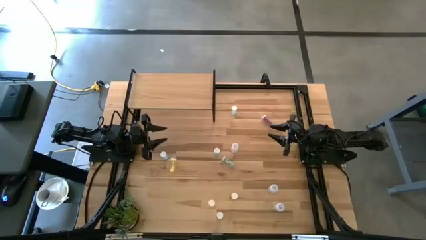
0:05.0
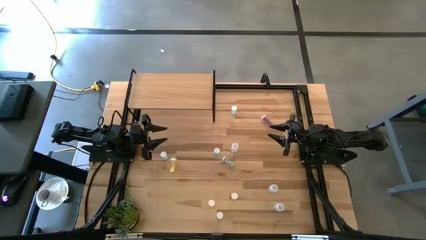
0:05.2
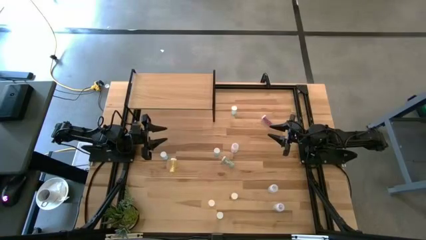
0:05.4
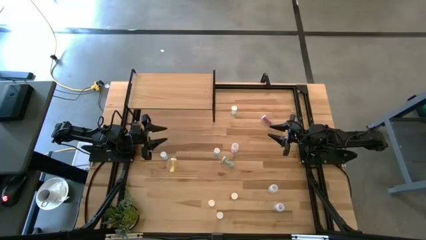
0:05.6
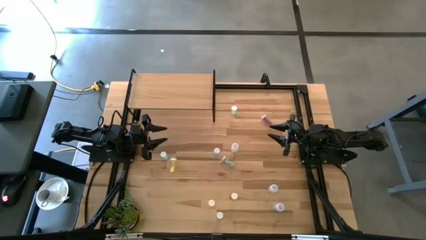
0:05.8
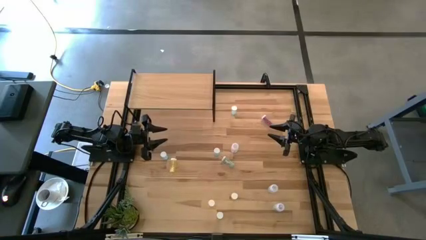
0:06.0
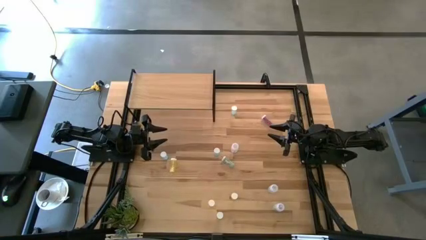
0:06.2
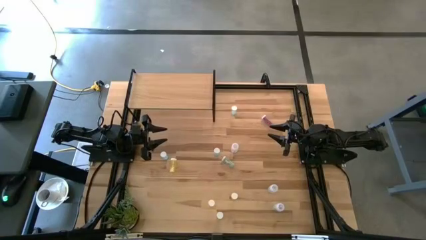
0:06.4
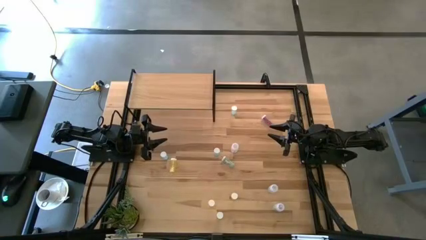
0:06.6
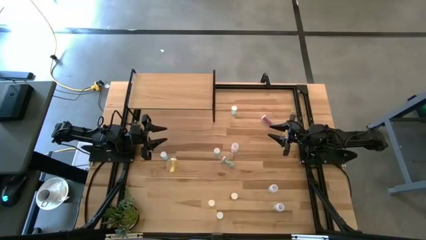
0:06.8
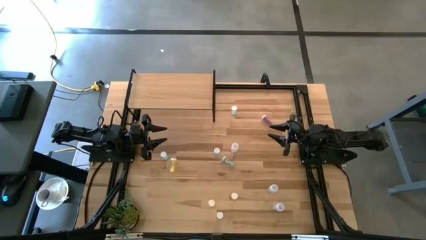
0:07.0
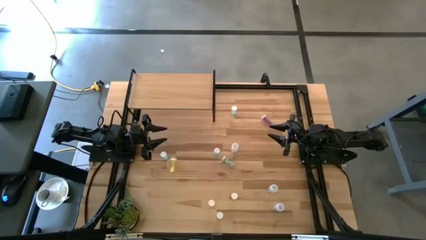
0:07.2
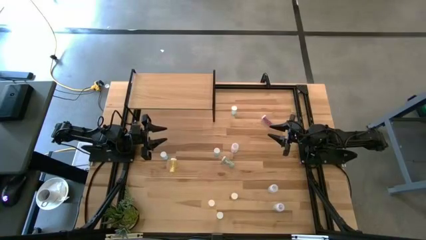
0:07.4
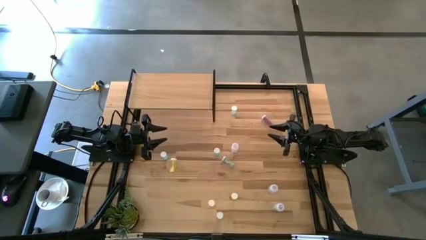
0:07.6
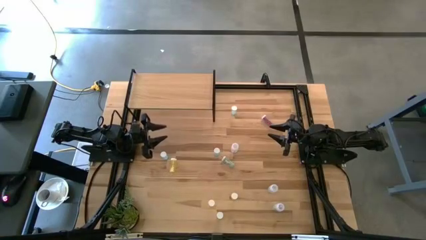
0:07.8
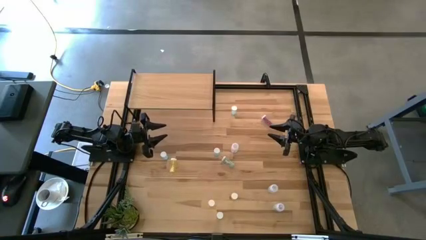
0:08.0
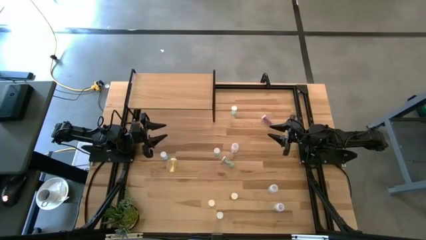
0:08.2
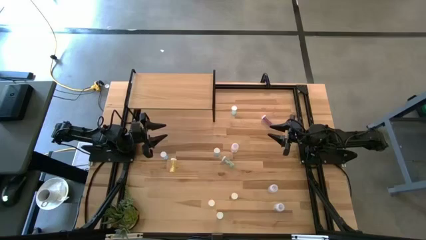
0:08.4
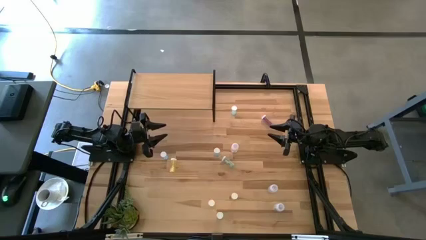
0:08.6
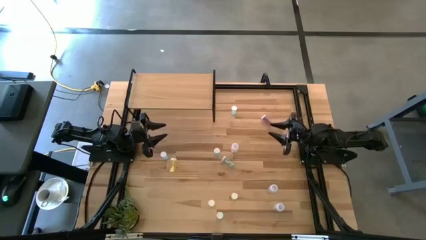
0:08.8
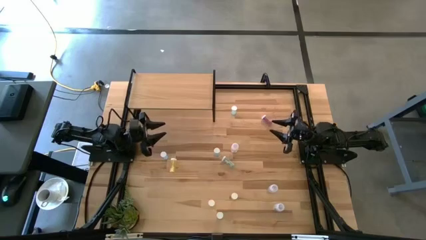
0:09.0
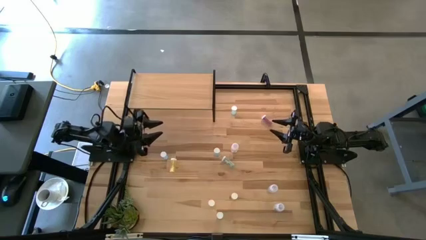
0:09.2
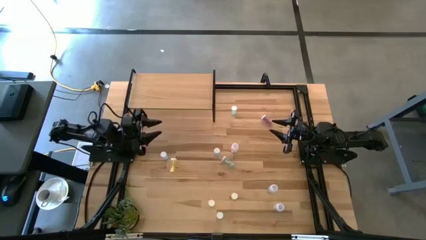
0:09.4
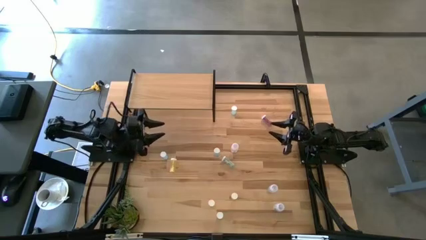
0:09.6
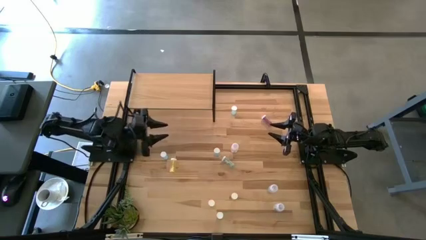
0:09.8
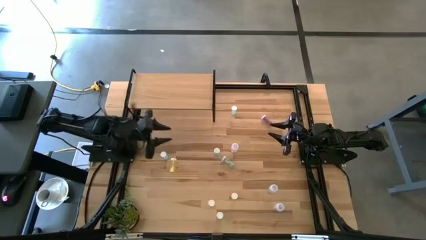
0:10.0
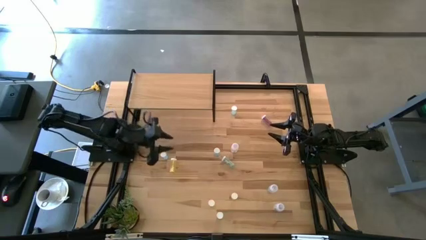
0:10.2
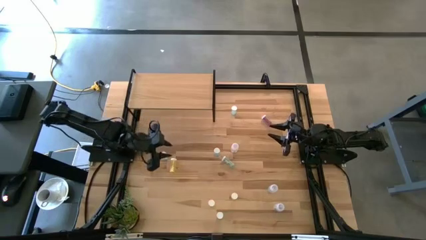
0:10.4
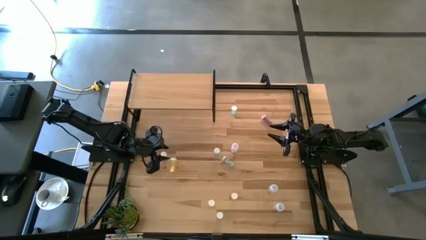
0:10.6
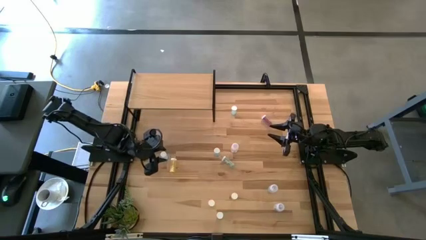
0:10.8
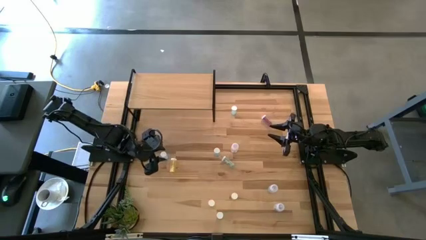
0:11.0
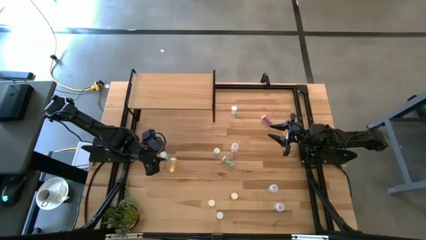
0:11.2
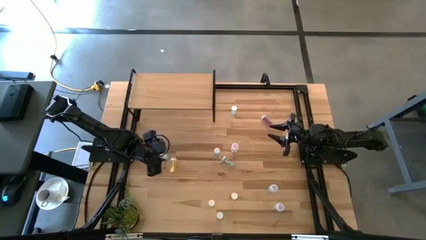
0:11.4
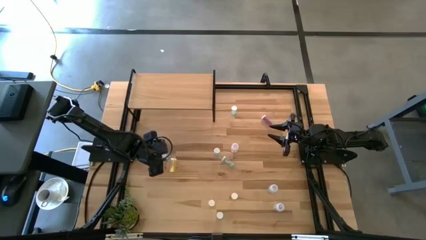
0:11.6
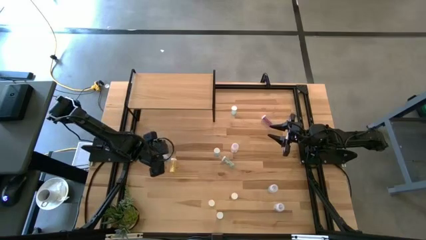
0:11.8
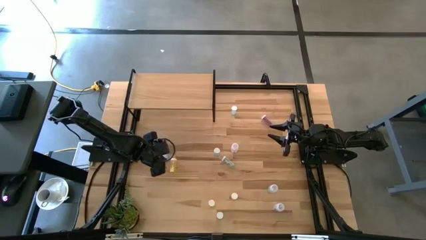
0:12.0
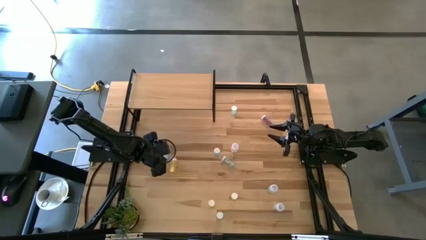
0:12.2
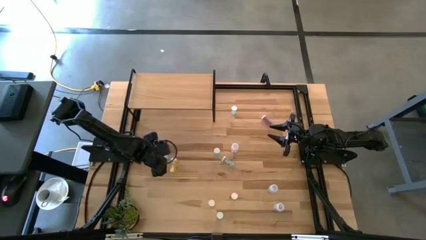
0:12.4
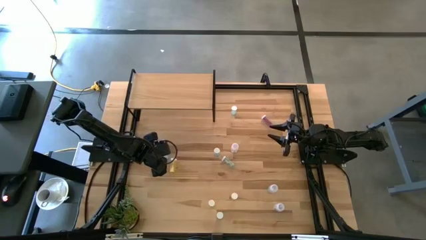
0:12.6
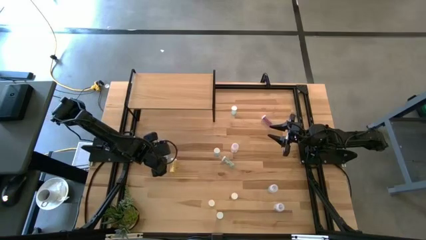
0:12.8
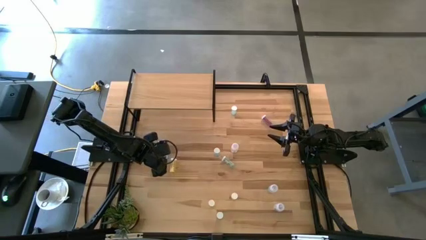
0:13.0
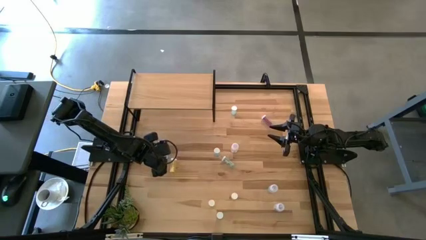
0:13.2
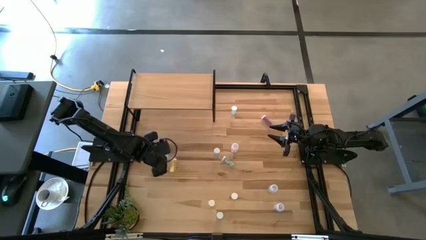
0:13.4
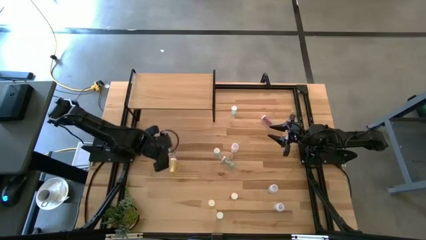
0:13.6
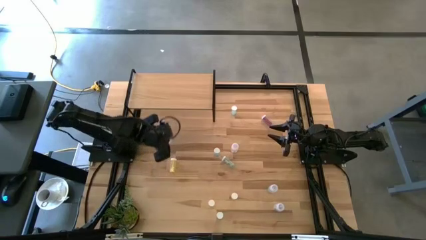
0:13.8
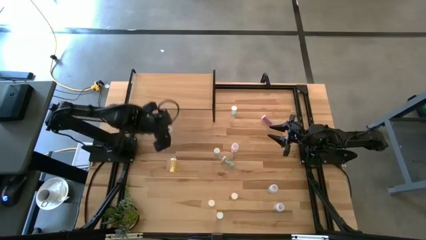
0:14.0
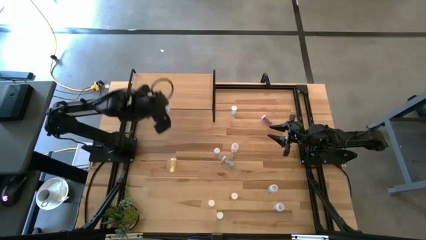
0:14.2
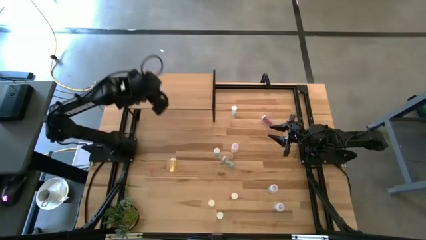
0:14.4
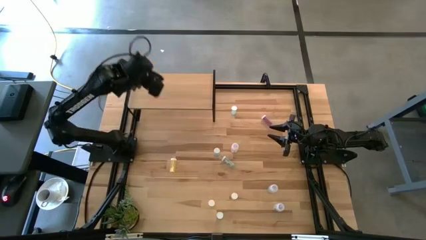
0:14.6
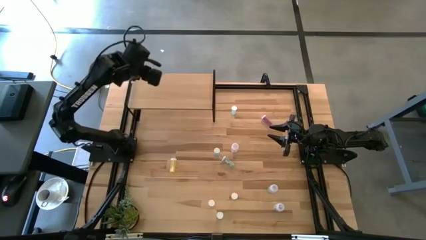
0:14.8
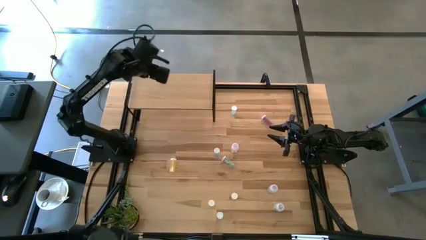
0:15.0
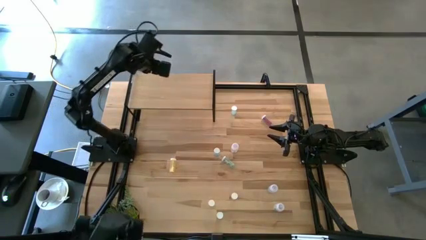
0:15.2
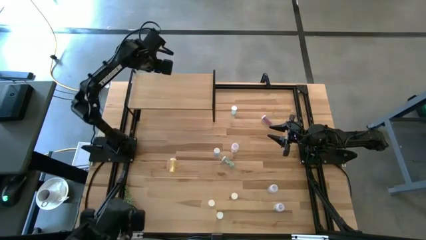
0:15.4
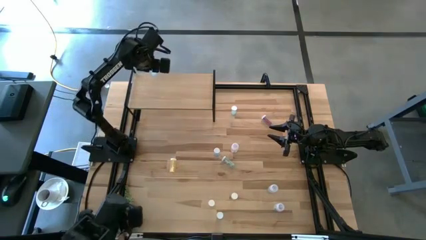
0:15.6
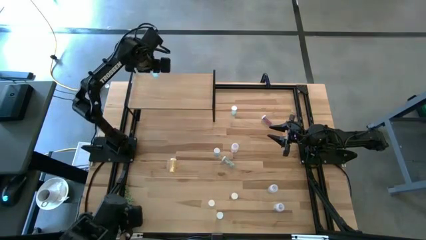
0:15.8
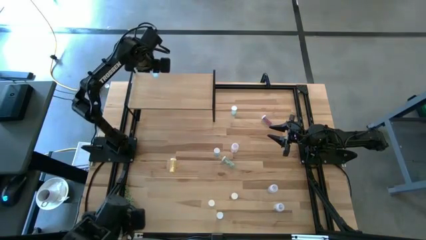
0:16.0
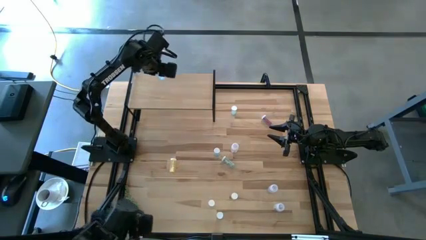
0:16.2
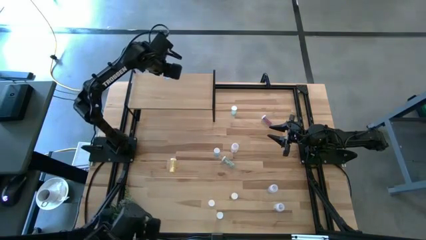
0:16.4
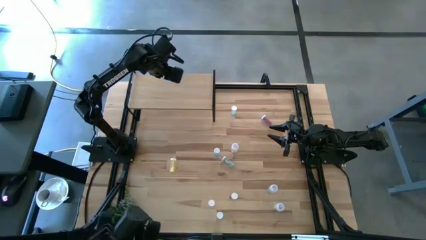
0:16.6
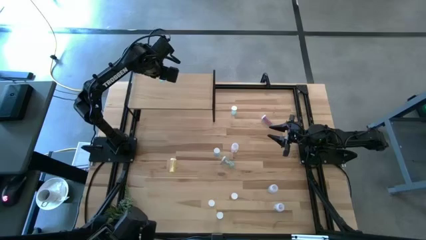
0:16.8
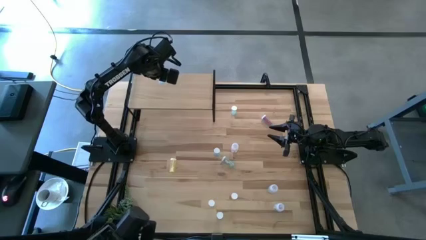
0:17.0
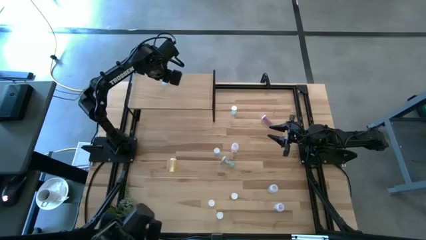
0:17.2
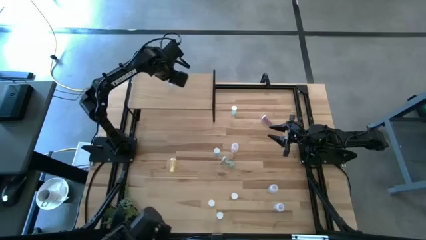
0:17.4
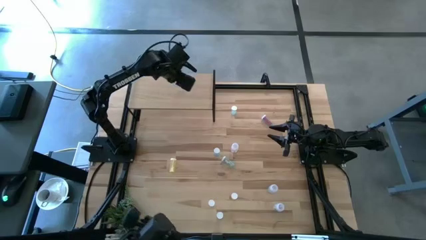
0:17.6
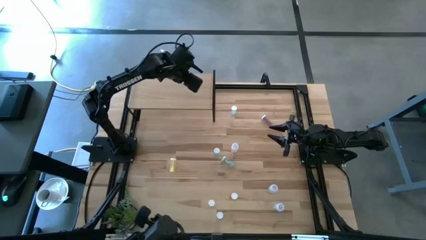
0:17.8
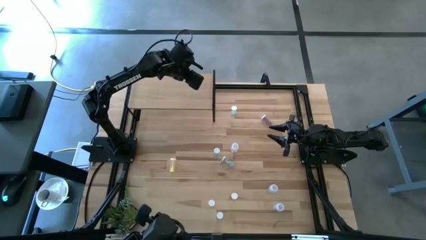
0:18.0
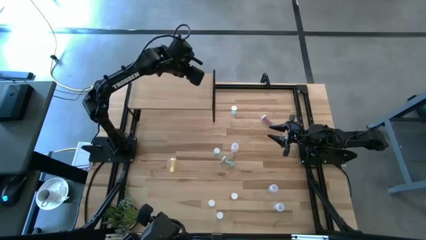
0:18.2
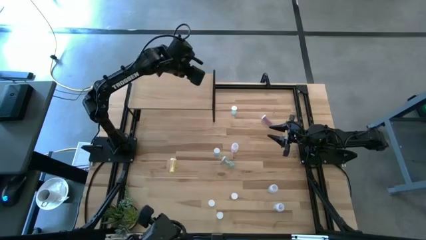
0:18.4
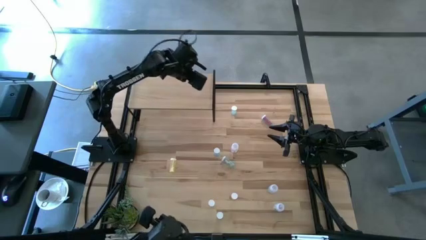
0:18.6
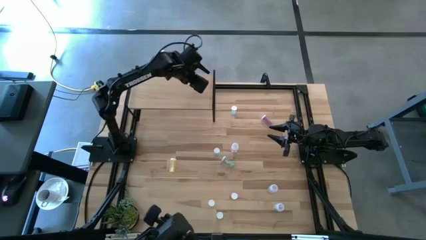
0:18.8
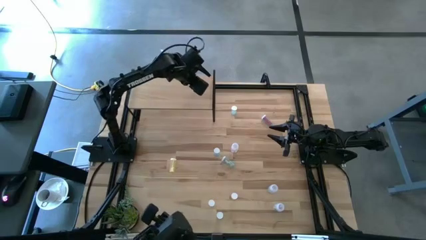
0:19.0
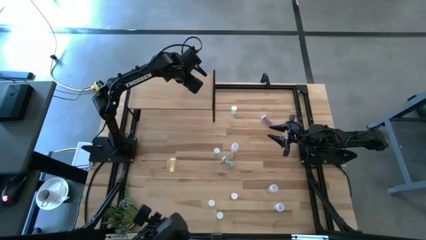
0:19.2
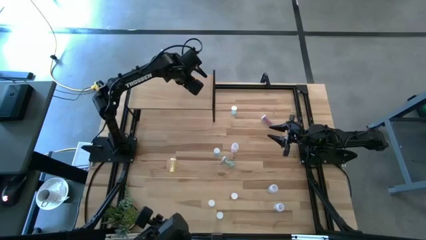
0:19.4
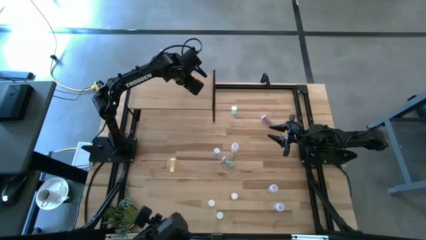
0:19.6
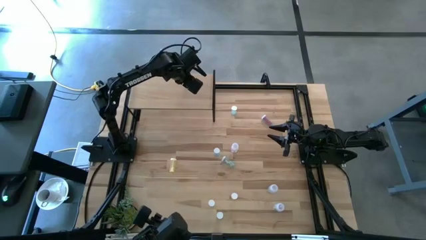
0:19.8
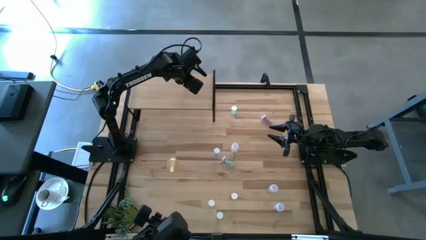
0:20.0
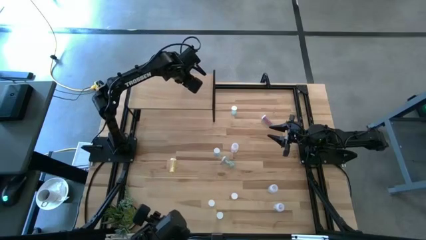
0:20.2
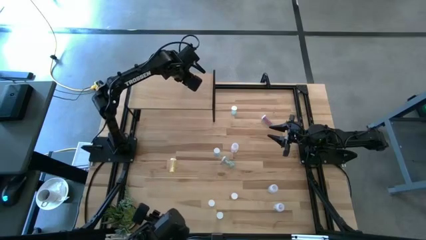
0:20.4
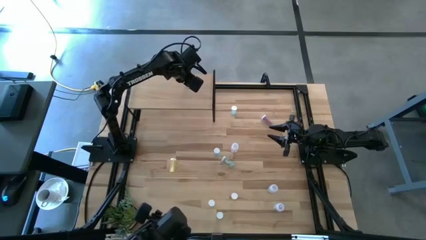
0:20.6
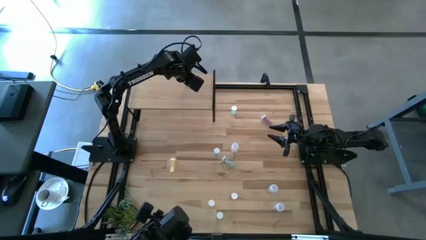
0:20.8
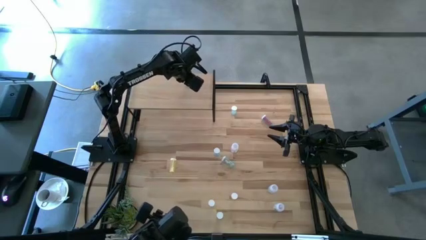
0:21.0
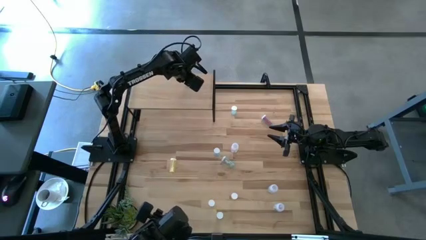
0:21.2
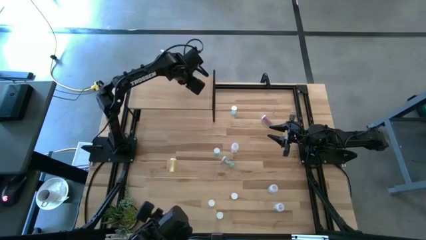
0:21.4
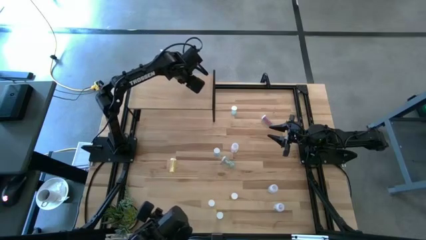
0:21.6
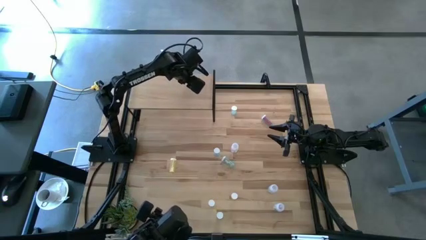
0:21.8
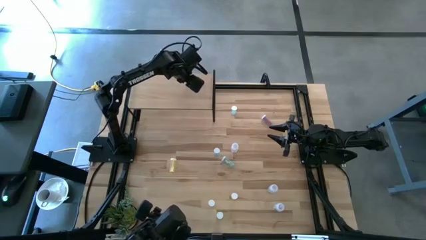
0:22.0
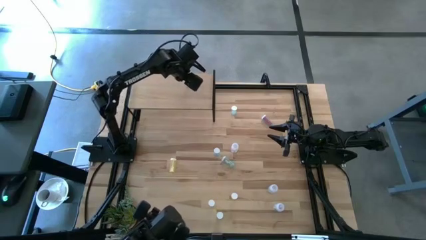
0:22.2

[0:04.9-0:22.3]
Task: Pick and place medicine bottles onto shelf by color
Put the bottom left blue pill bottle on the shelf
